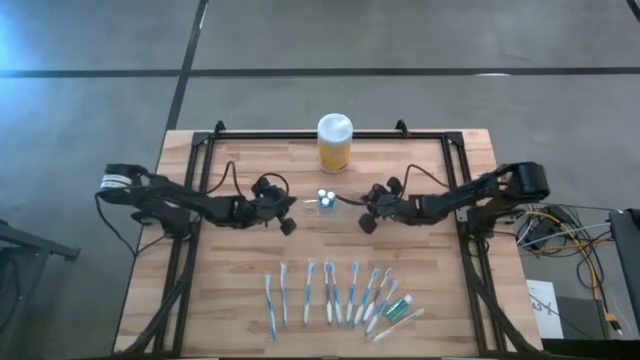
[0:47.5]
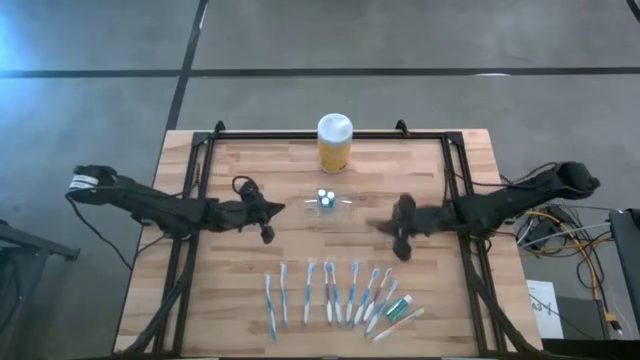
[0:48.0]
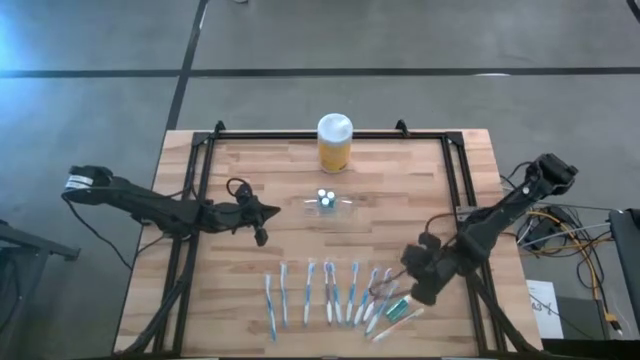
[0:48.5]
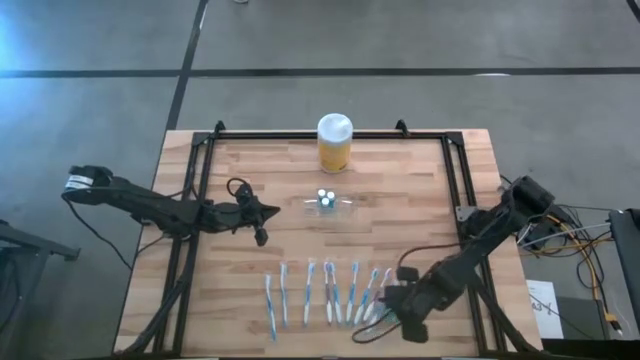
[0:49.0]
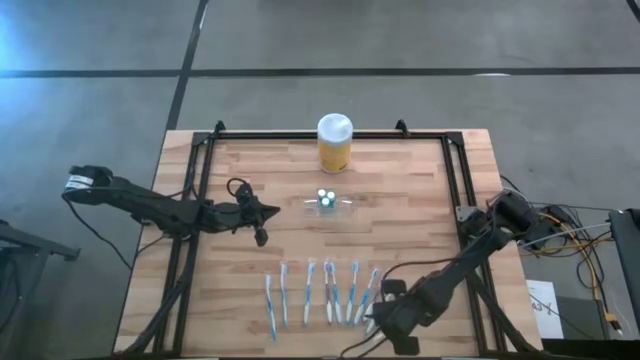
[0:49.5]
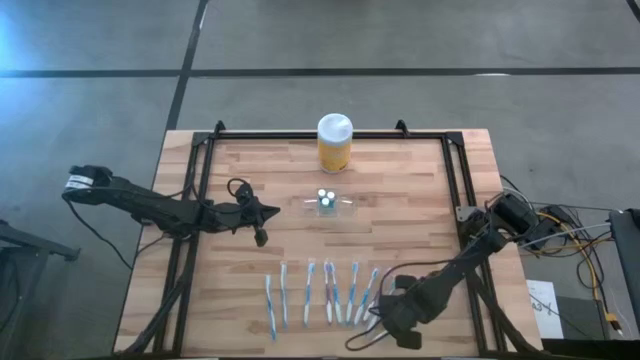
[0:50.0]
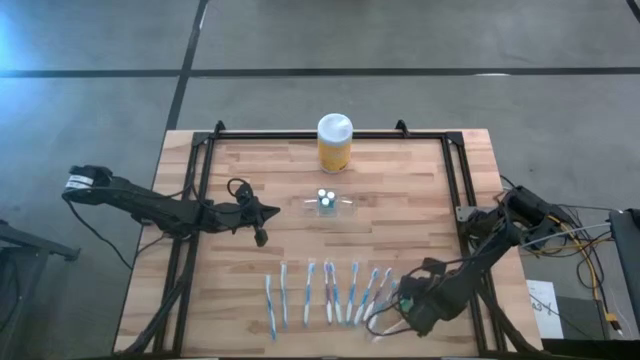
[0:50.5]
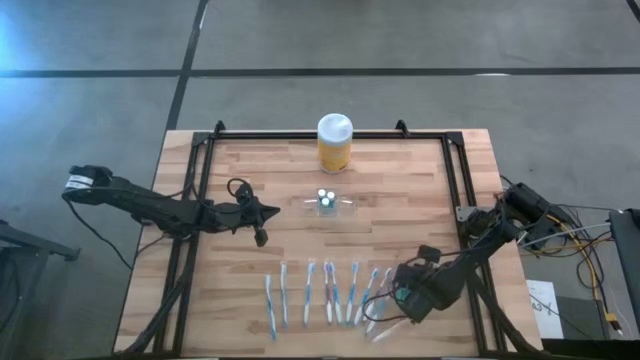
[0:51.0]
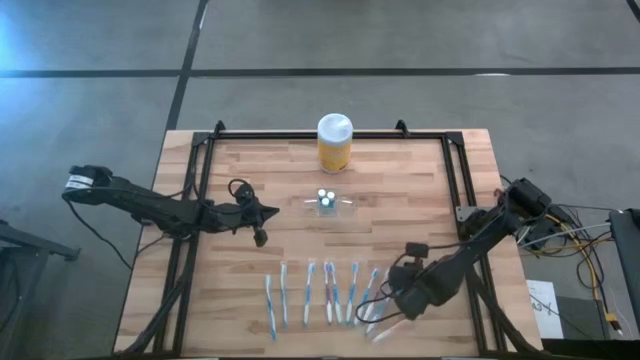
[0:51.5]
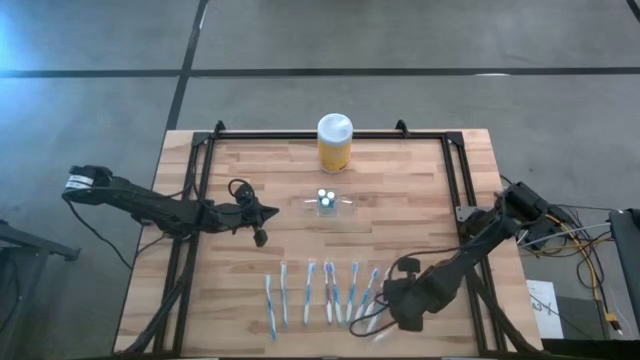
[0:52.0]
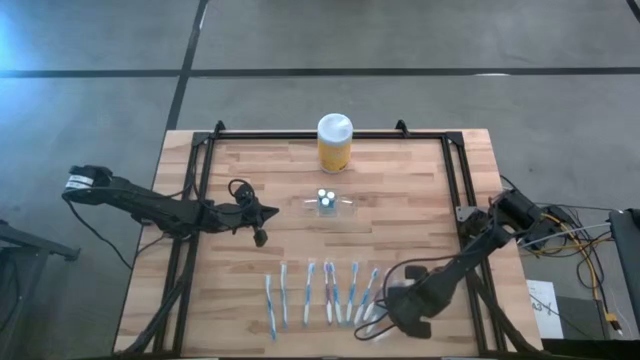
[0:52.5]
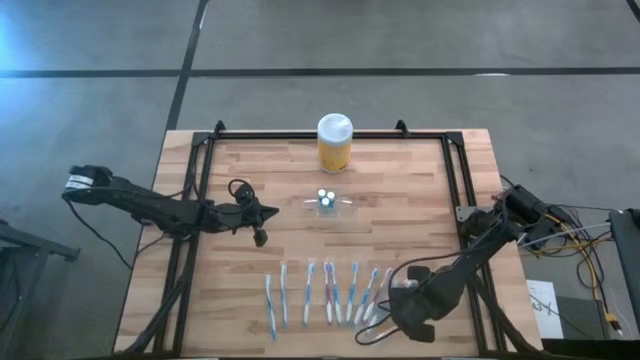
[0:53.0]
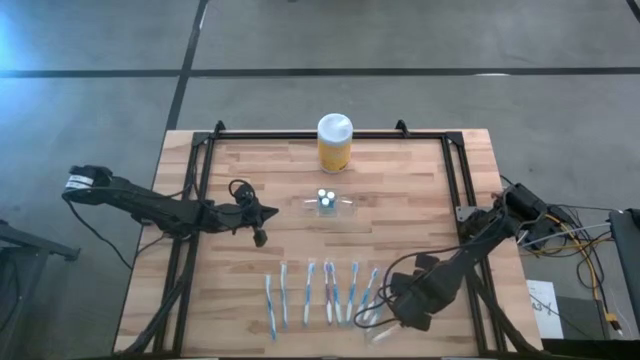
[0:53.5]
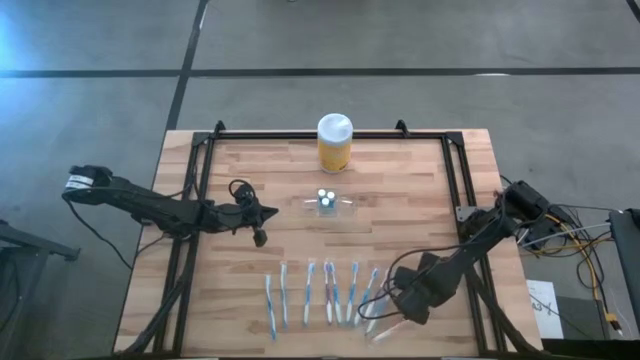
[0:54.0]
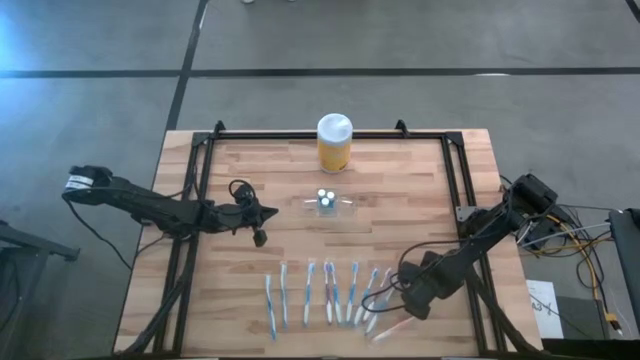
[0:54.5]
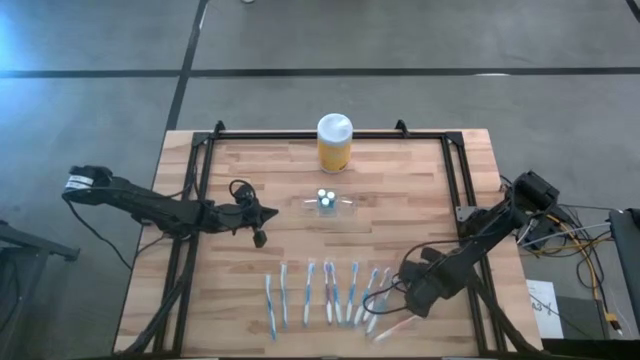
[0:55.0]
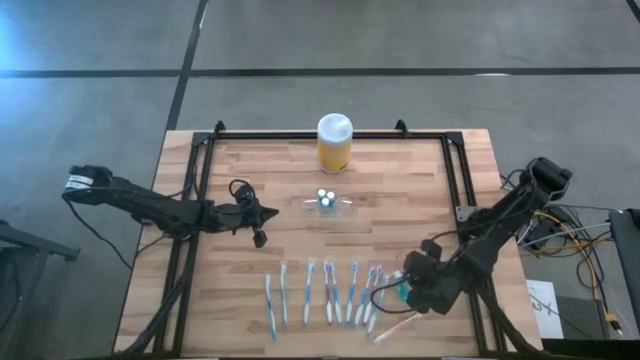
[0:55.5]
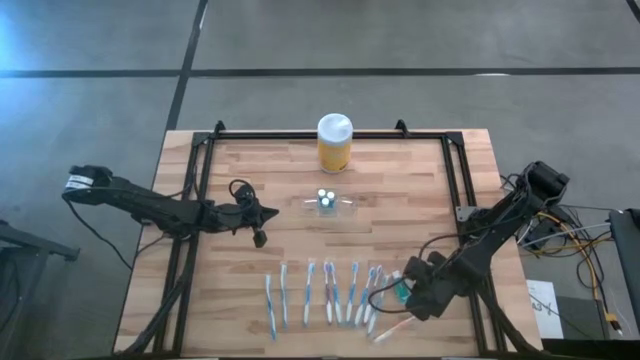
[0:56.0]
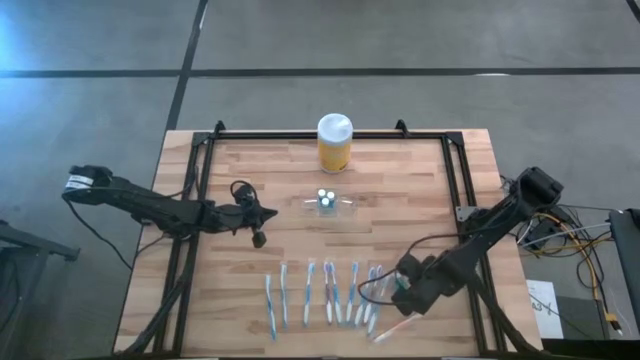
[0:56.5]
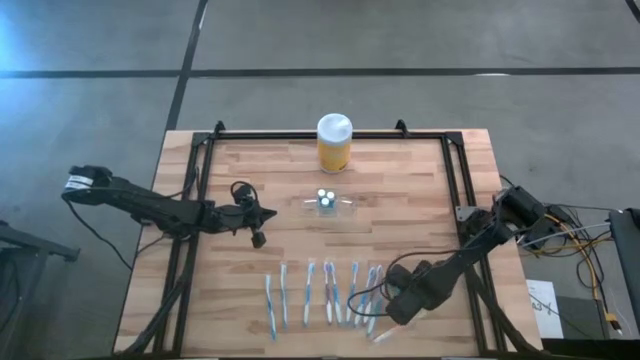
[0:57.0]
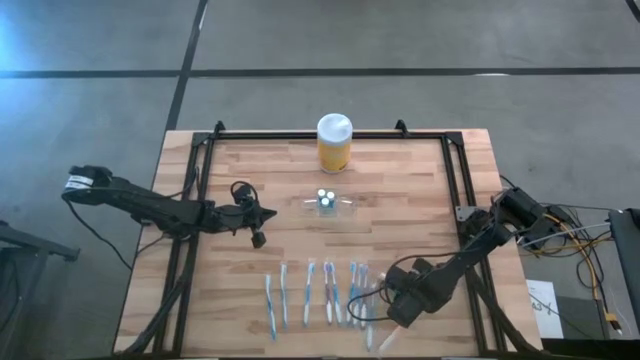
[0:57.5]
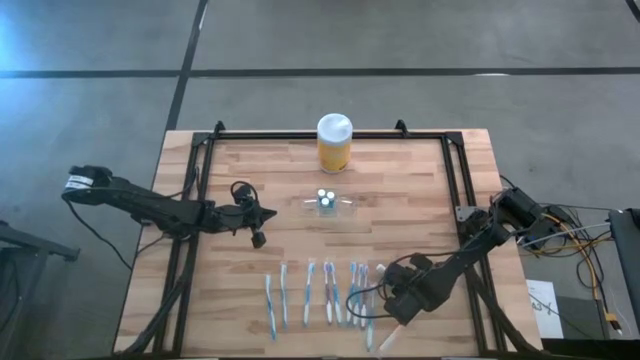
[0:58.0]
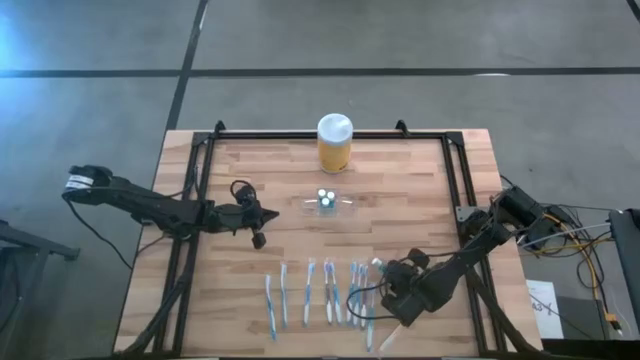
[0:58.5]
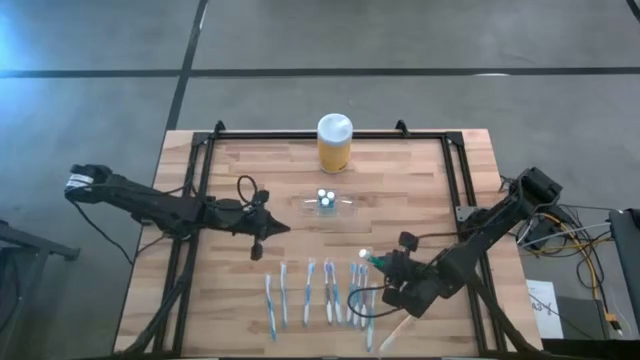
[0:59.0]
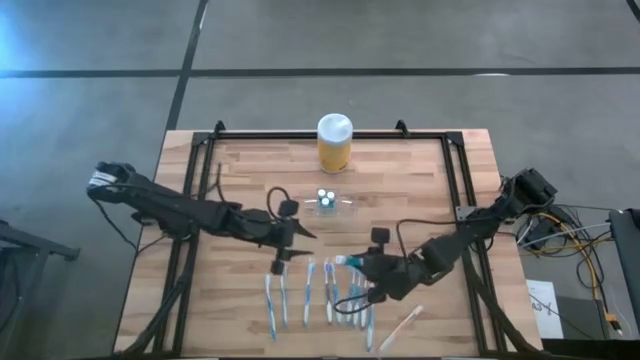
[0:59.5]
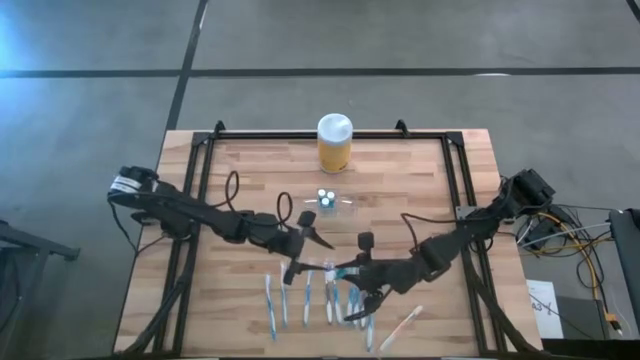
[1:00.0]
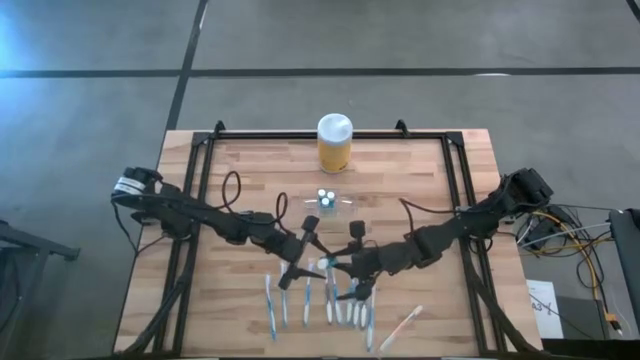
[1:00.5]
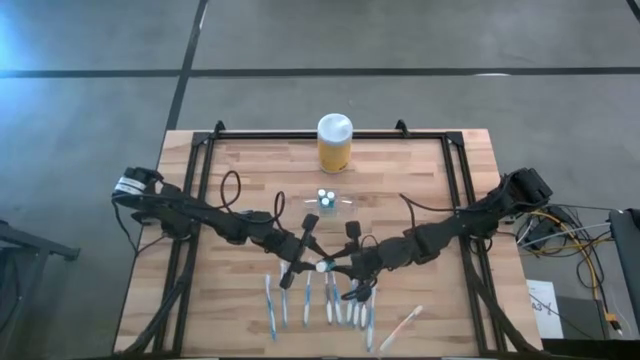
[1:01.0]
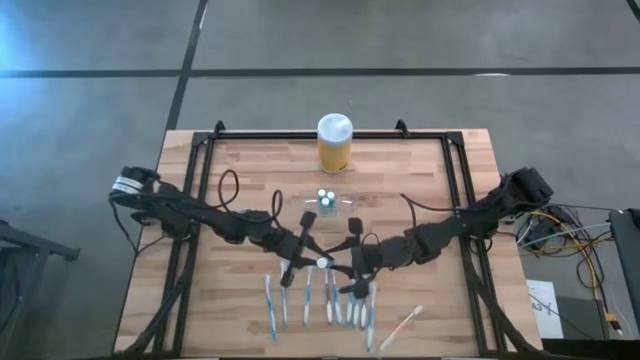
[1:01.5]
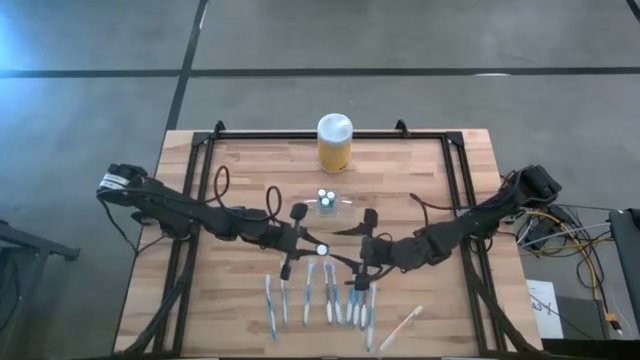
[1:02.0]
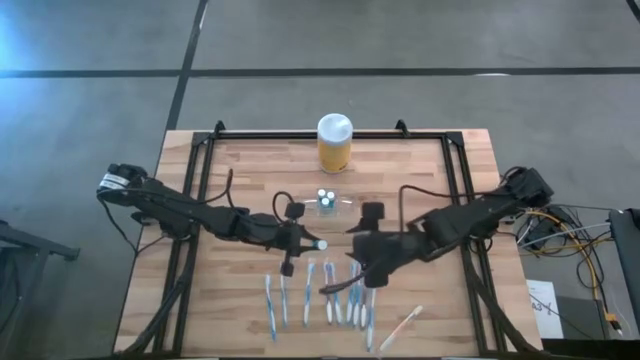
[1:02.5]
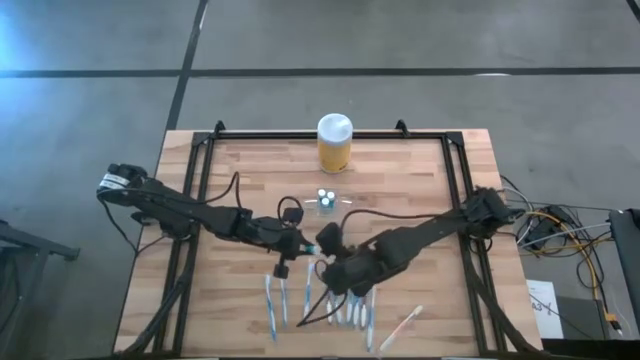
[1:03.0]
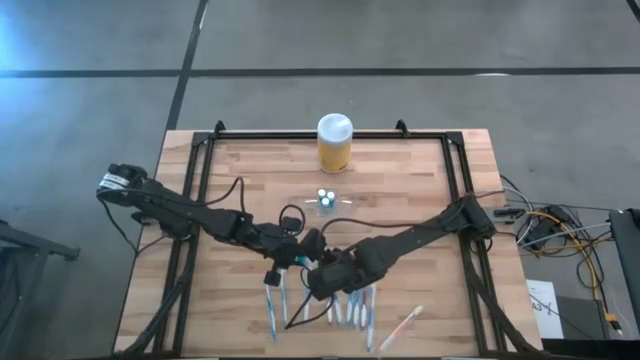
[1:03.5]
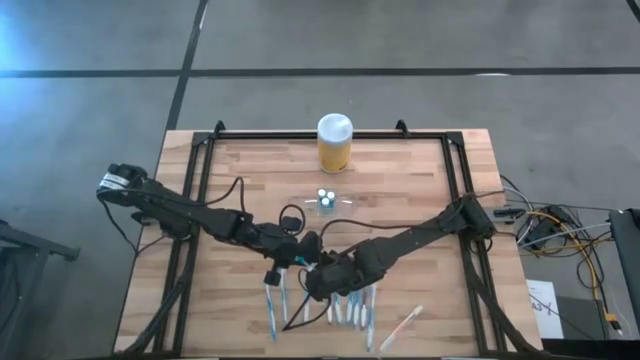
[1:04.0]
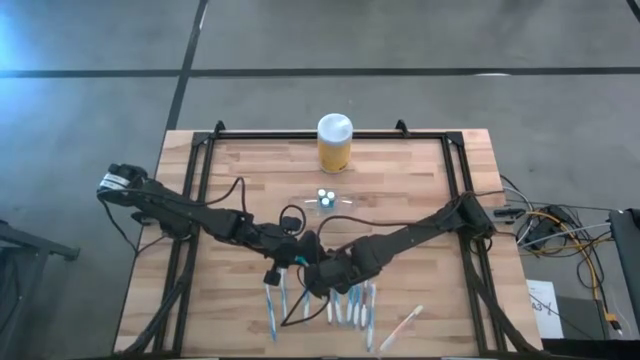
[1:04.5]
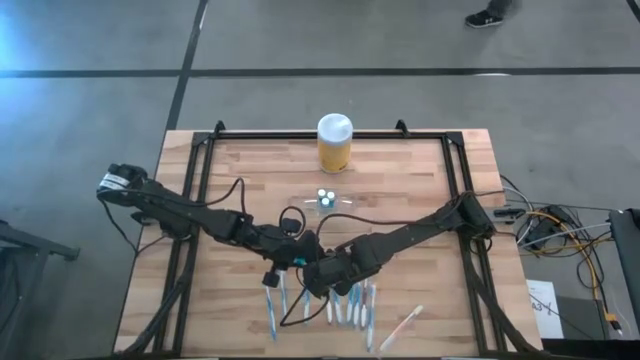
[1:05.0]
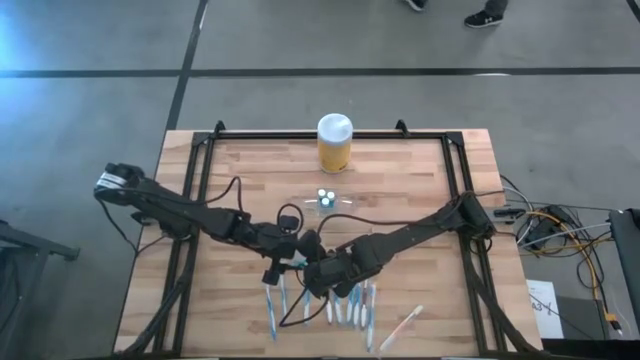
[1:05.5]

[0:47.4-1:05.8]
Task: Pick & Place toothbrushing station
Put the blue mouthwash into the middle of the transparent organizer
